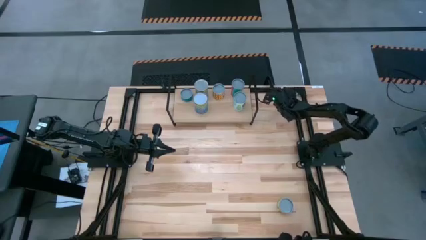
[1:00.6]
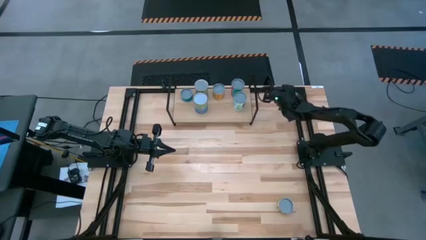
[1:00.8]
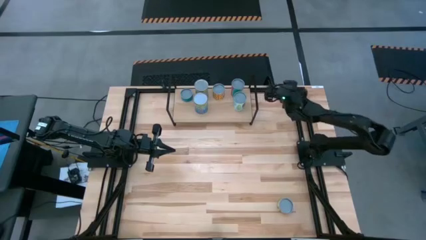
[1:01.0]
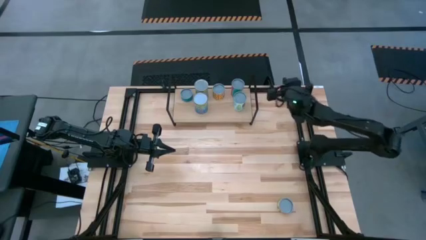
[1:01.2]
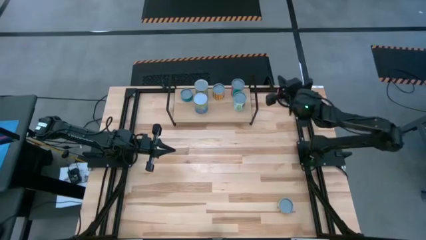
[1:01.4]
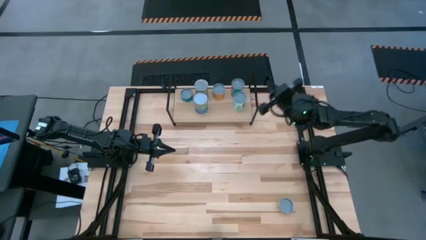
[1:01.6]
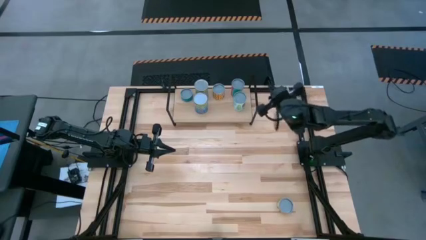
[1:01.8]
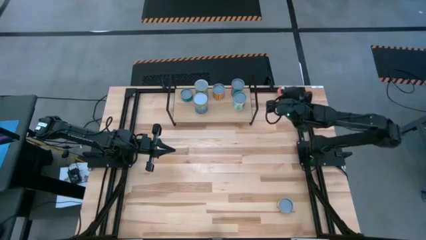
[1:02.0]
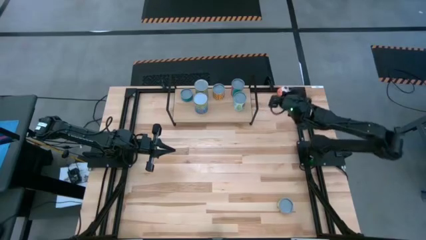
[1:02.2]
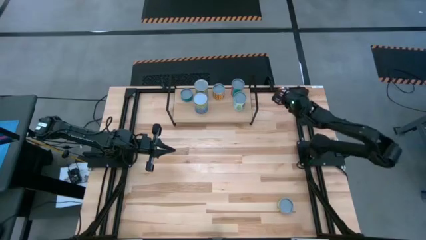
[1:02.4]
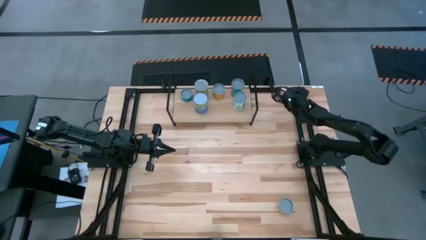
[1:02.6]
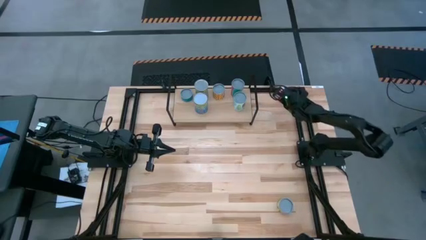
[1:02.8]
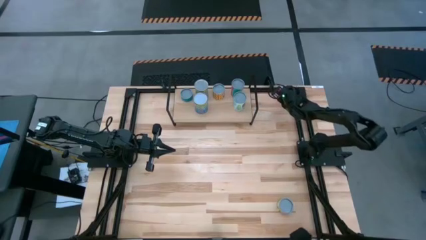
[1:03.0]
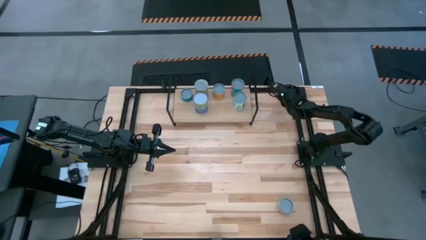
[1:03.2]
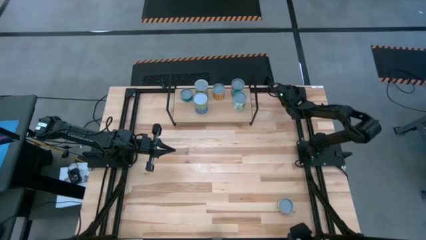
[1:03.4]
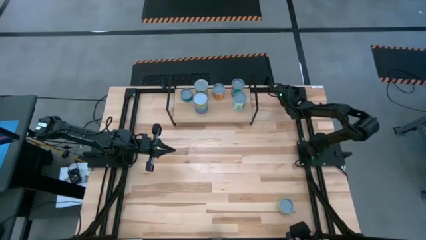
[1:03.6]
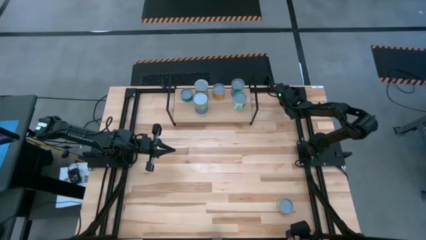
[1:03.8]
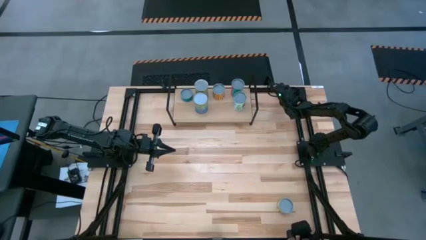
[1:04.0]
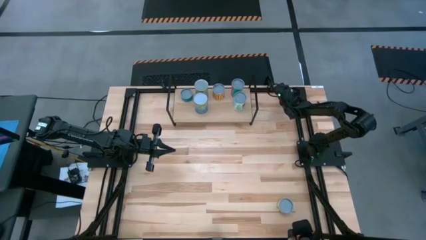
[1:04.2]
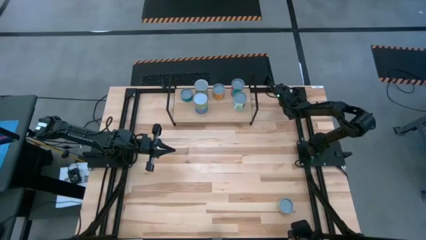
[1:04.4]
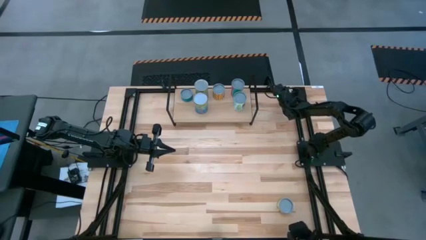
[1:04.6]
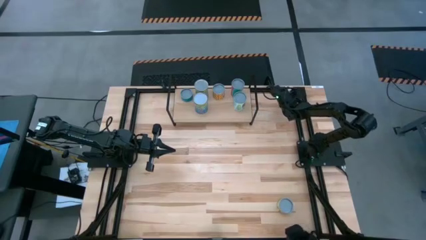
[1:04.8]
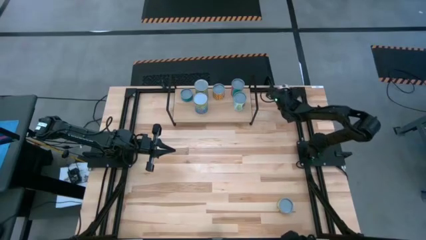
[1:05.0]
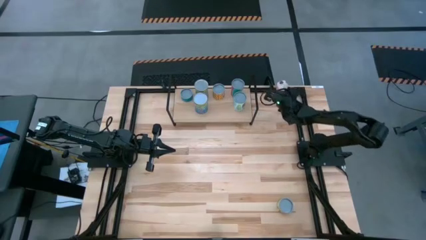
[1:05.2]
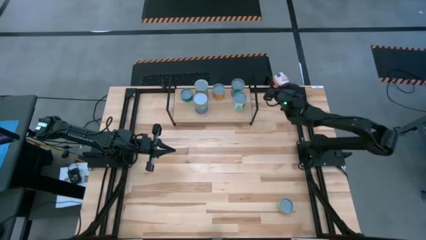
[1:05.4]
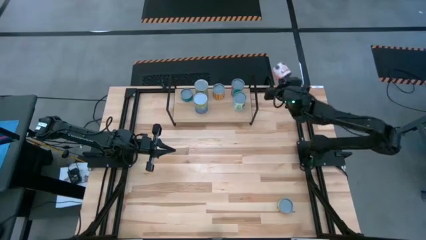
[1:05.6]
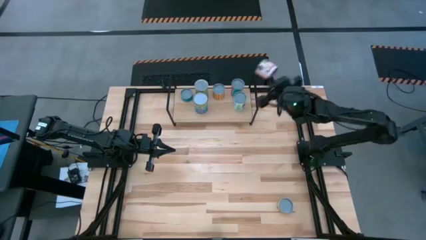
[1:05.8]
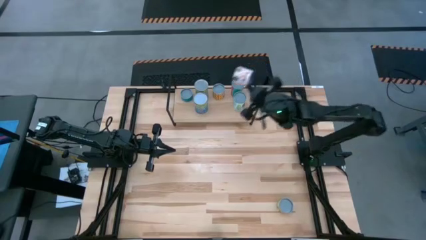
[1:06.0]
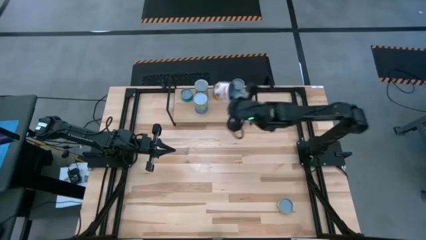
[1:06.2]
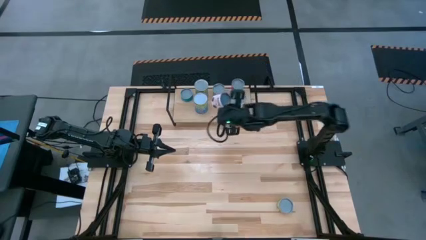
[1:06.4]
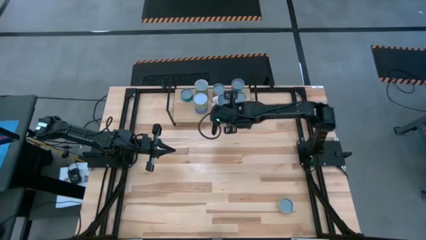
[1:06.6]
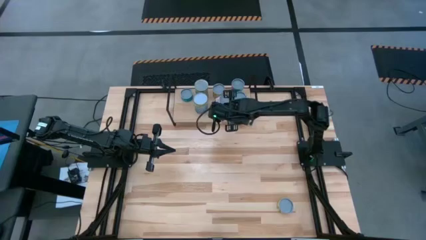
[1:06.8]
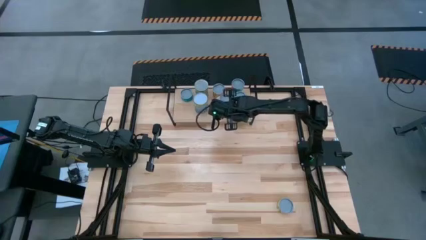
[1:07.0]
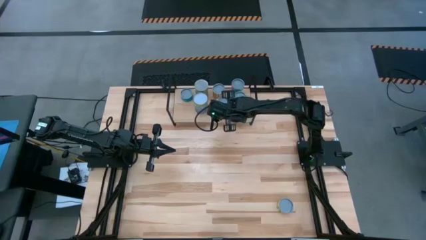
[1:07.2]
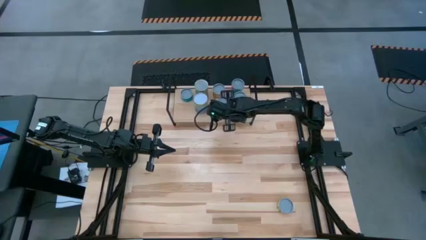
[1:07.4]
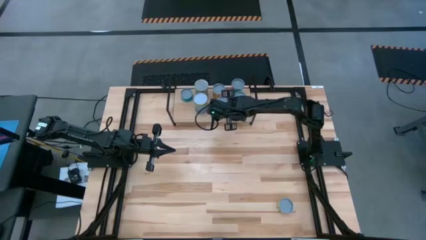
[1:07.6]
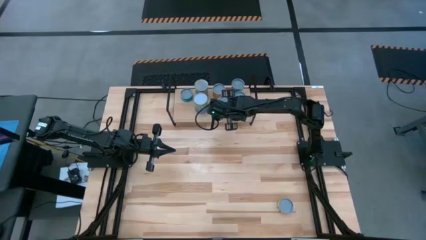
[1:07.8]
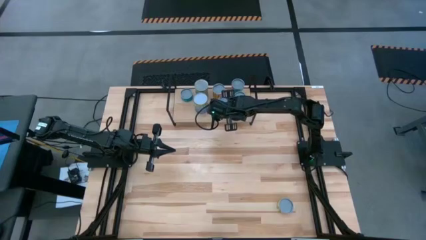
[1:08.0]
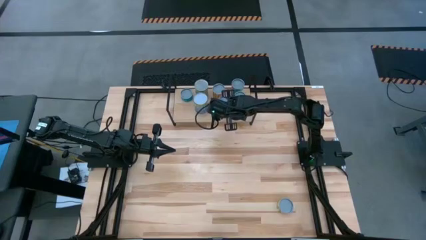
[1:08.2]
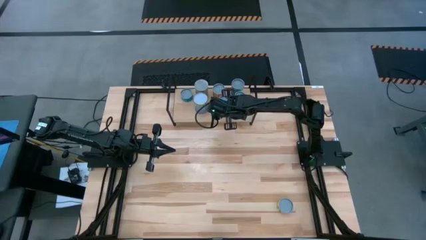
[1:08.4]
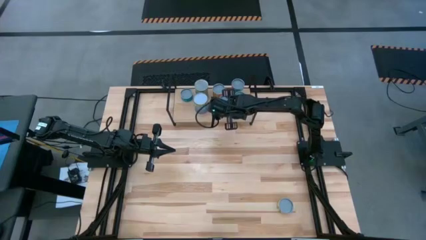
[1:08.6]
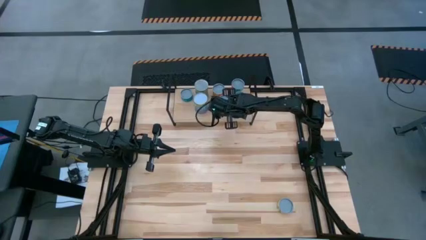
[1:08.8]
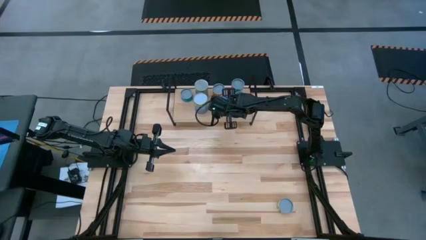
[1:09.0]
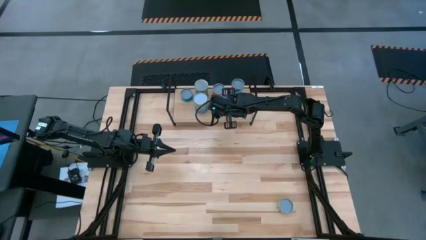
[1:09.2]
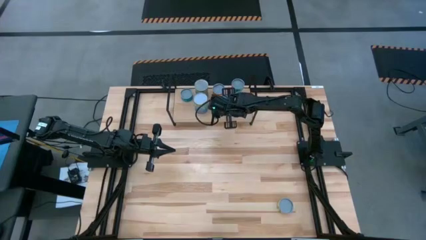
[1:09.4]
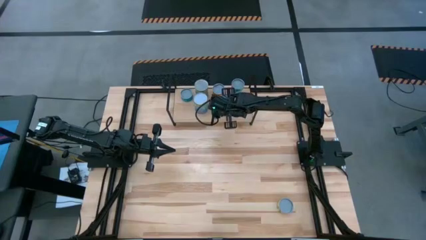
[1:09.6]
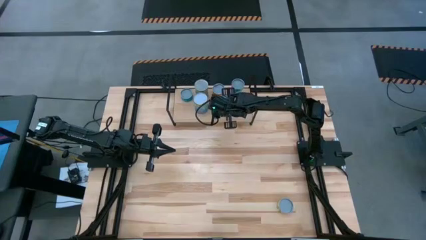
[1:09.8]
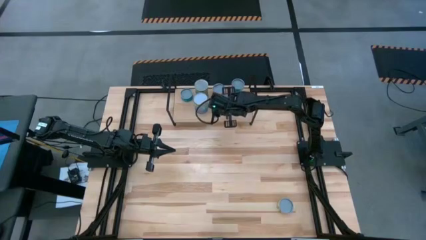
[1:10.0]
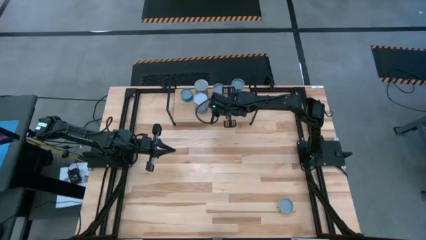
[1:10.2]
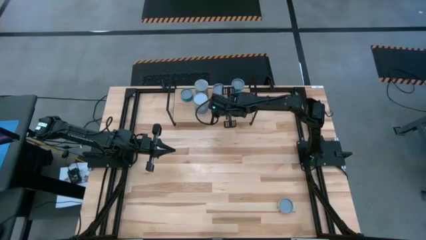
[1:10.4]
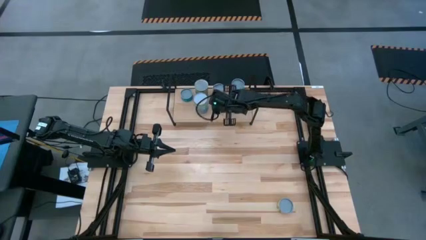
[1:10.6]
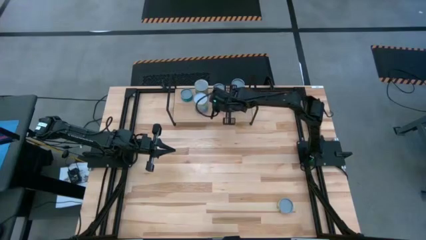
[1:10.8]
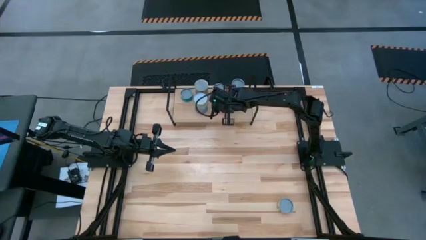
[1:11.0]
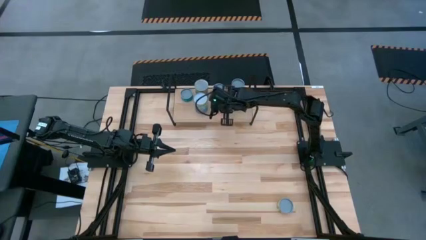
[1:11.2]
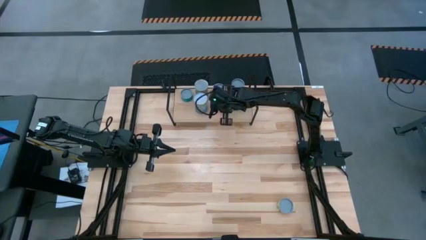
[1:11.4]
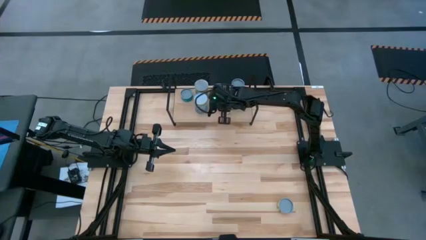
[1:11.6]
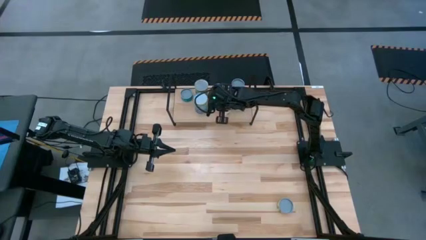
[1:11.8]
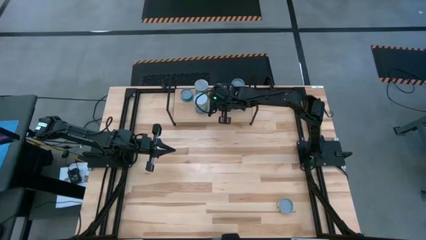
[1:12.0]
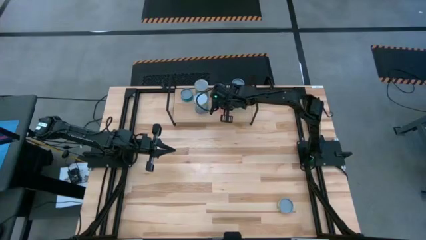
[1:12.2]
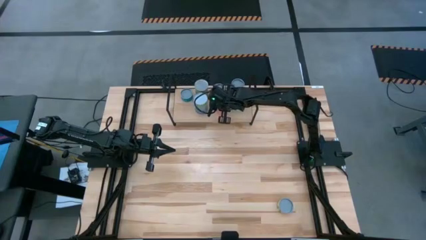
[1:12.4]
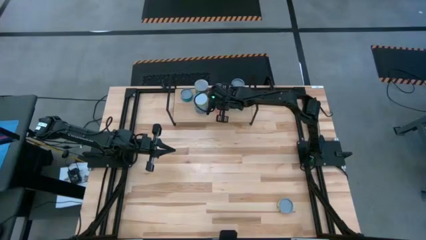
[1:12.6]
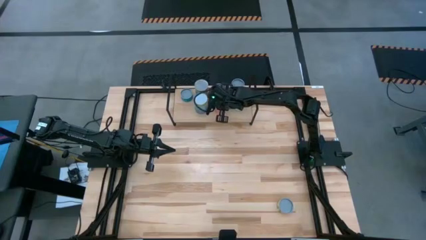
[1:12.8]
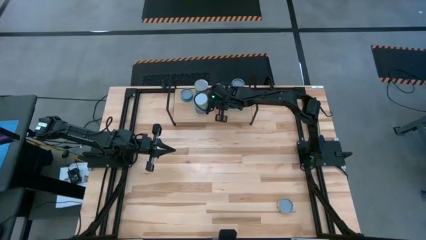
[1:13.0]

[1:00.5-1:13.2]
Task: Pick and place cans onto a shelf
Put the canned meatballs on the shelf
